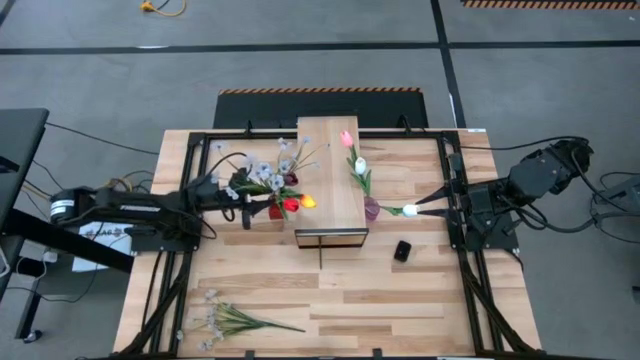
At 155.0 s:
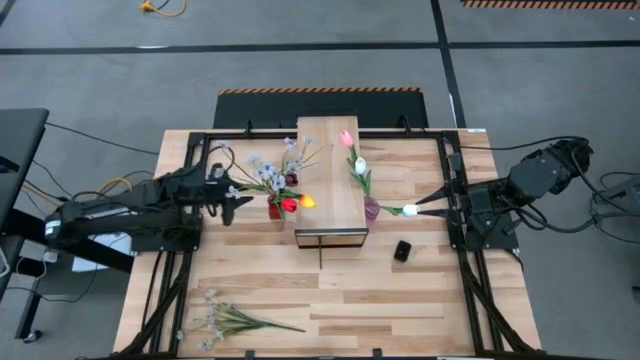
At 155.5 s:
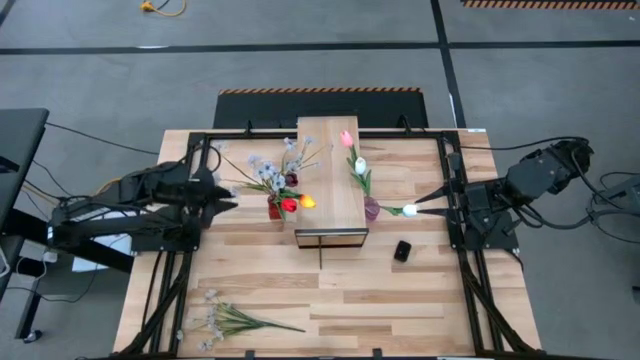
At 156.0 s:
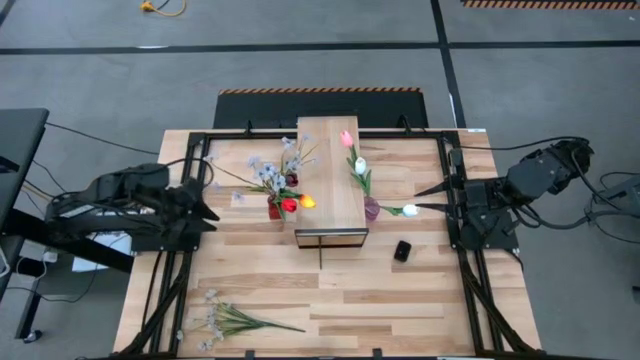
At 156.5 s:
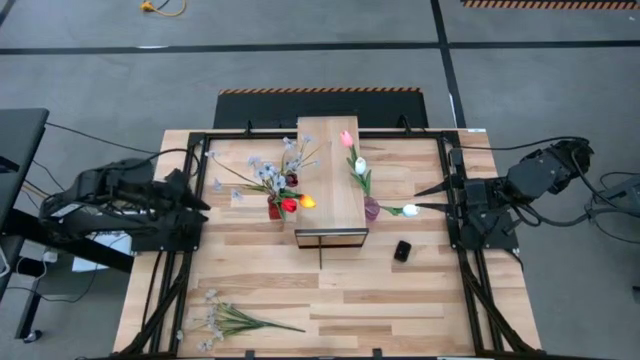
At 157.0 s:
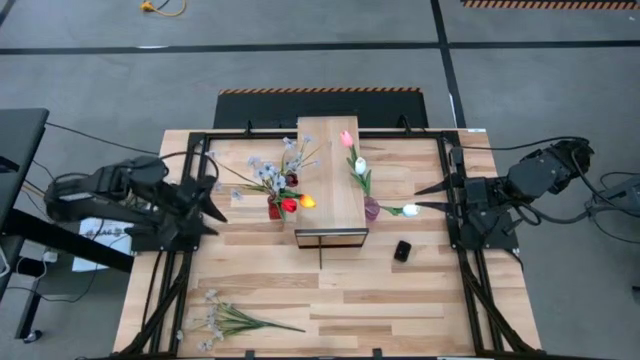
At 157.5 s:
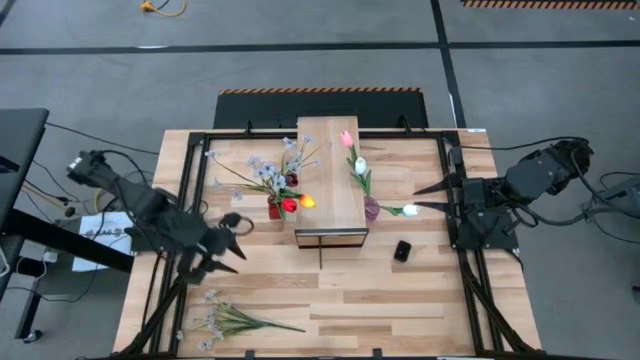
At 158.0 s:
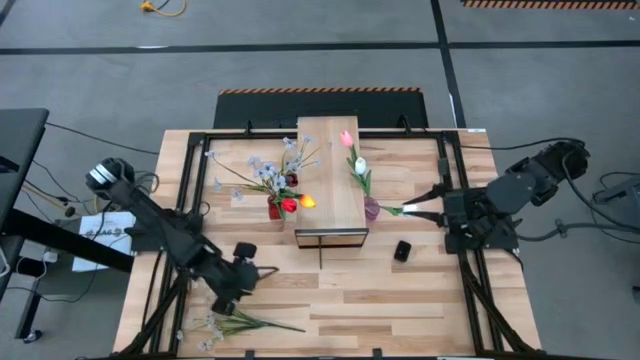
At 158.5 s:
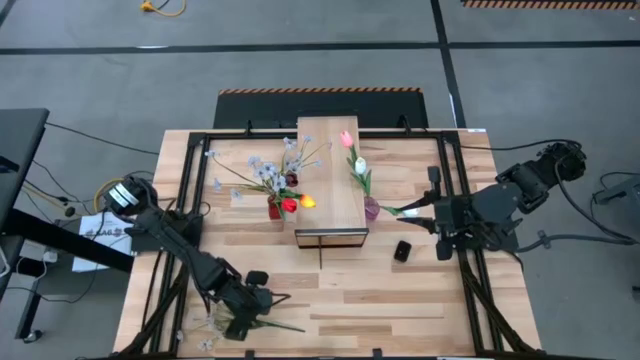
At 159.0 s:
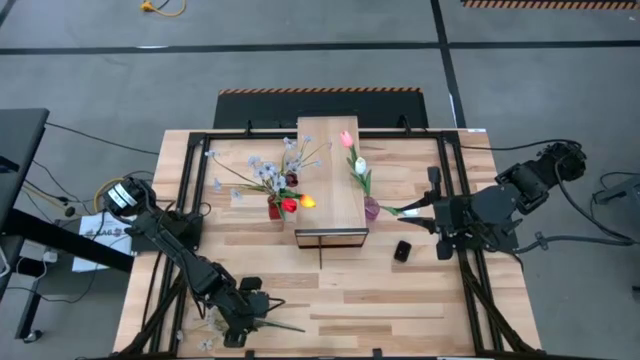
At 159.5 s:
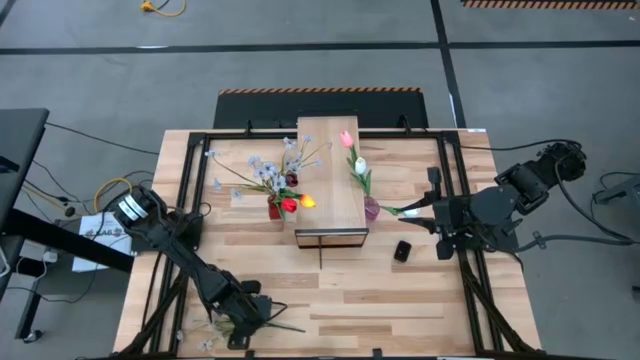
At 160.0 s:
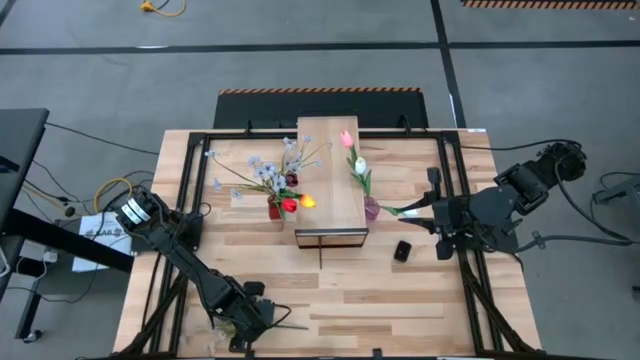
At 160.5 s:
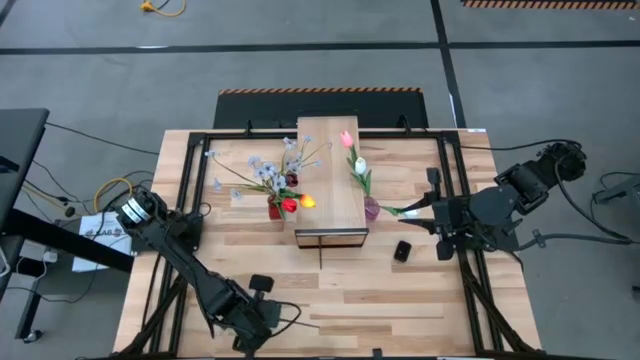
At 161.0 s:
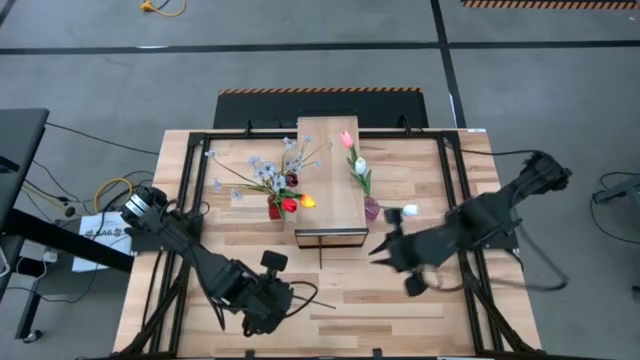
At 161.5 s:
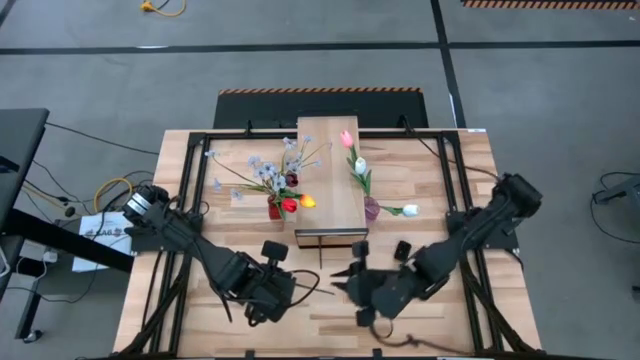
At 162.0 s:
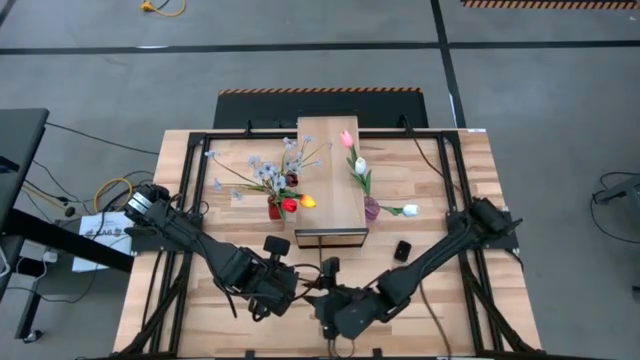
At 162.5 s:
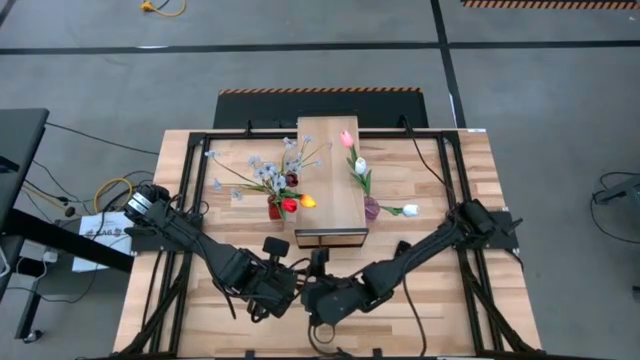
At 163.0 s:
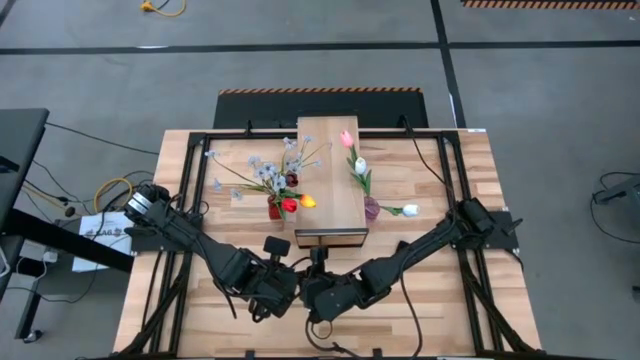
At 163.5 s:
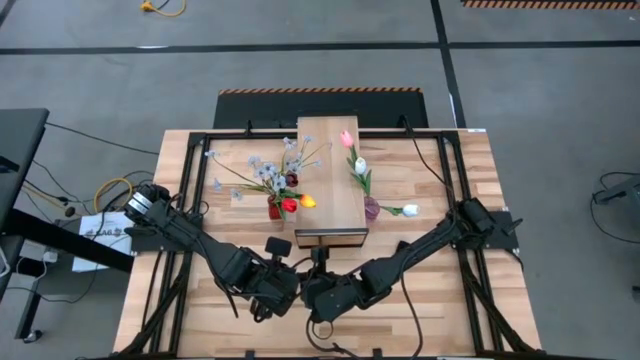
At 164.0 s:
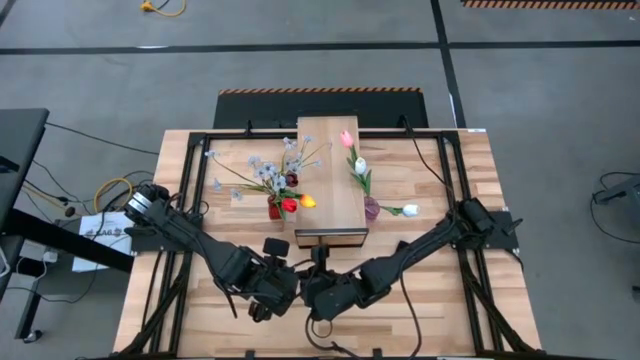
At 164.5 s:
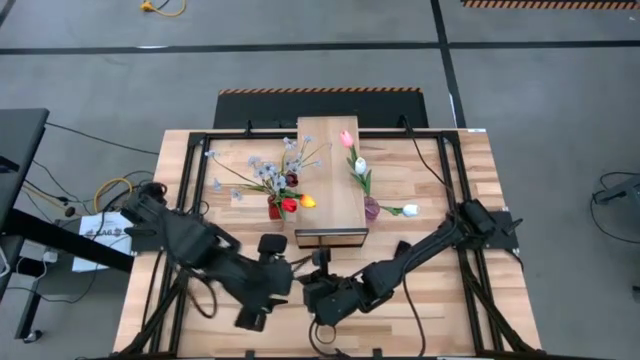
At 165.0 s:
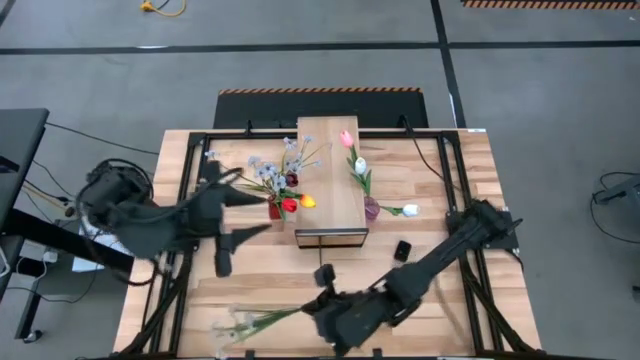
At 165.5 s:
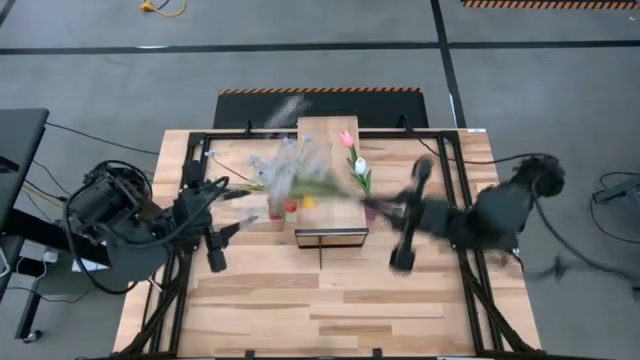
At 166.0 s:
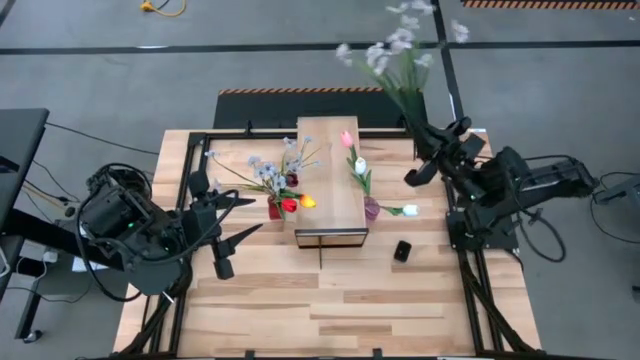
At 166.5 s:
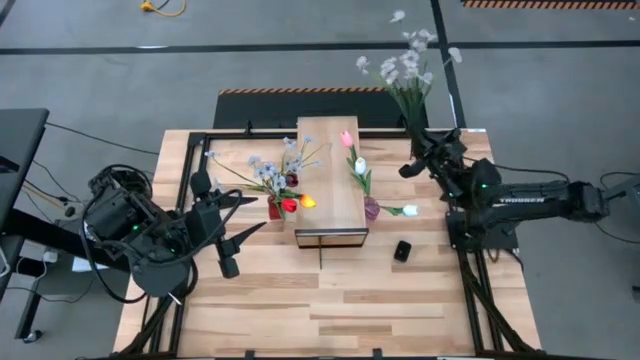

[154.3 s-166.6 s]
Task: Pick and place flowers into a vace then onto a shelf
Put the left white flowers into the purple flower vase

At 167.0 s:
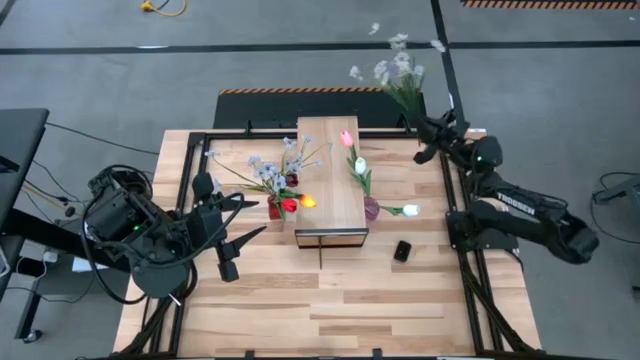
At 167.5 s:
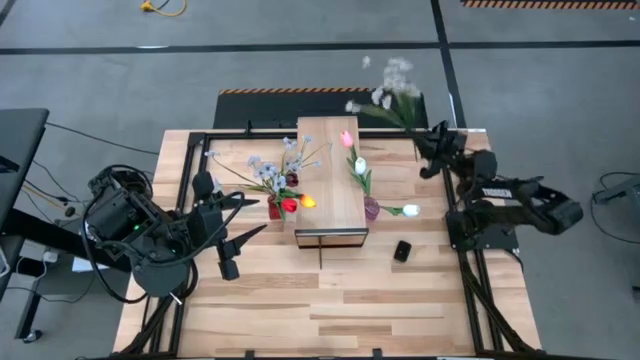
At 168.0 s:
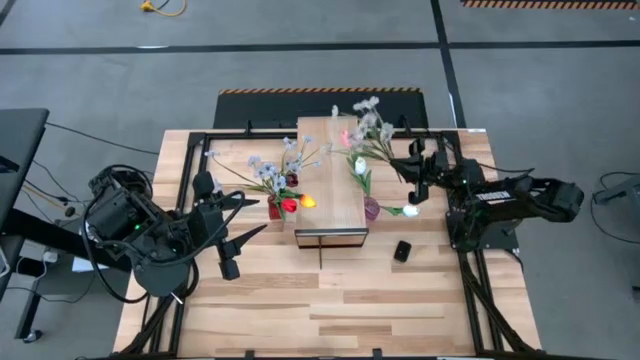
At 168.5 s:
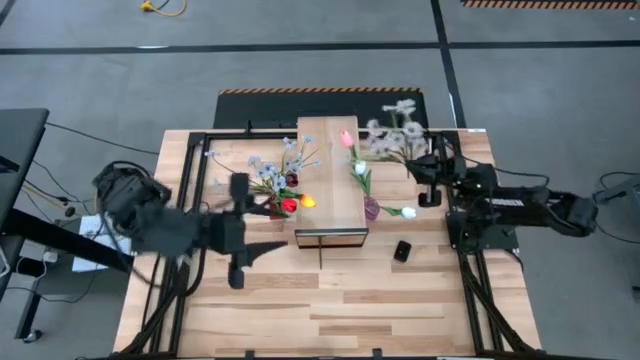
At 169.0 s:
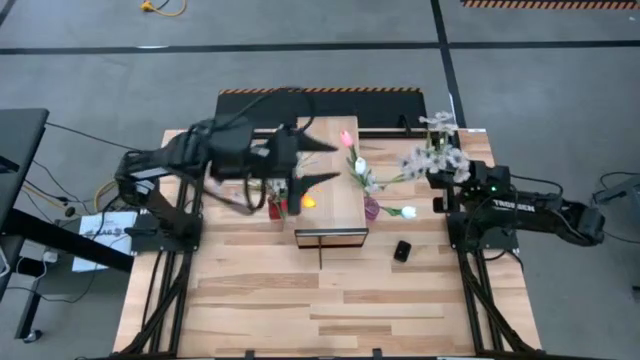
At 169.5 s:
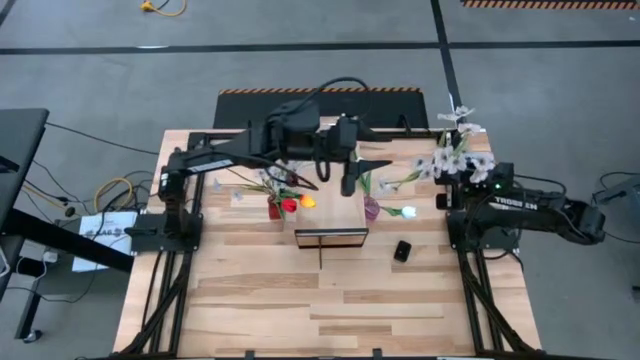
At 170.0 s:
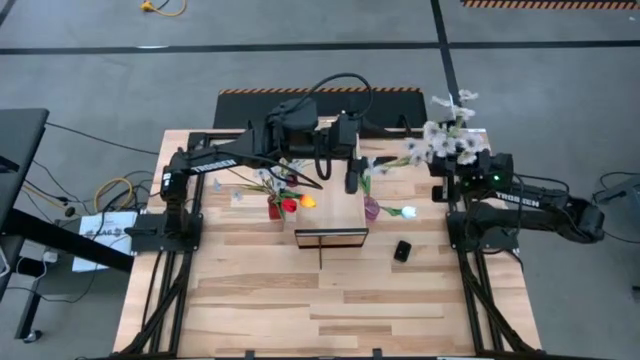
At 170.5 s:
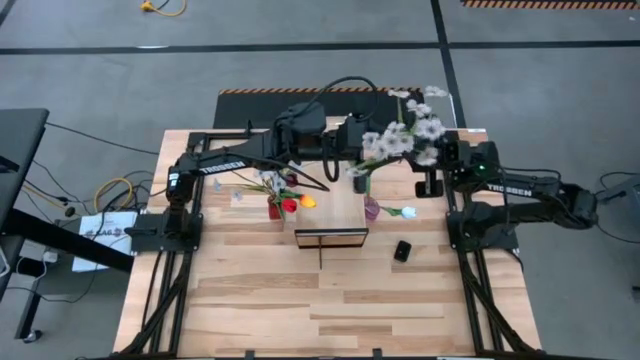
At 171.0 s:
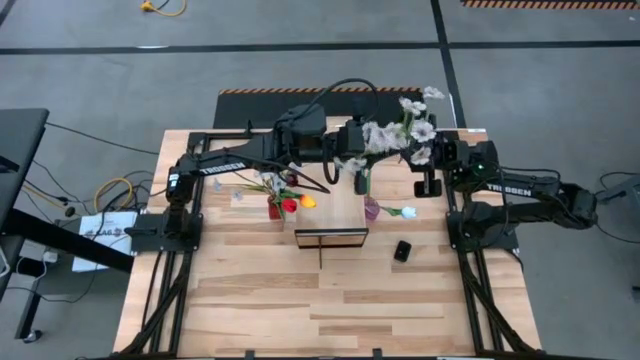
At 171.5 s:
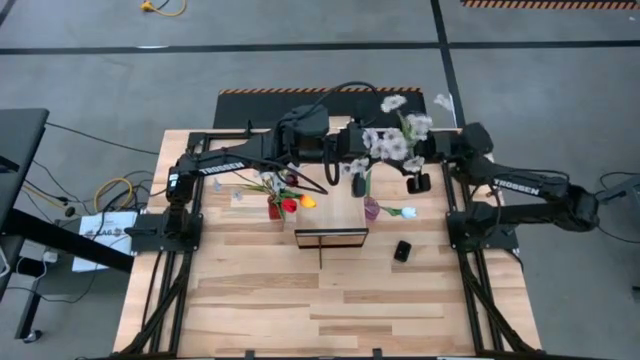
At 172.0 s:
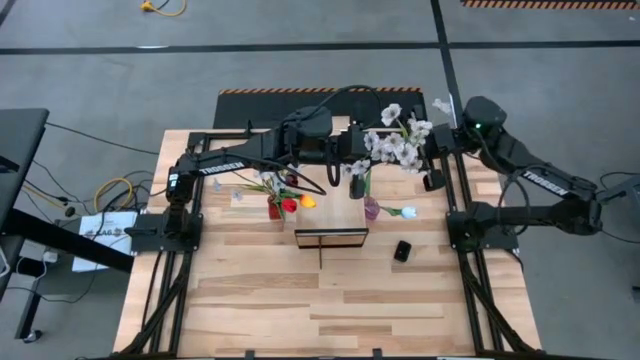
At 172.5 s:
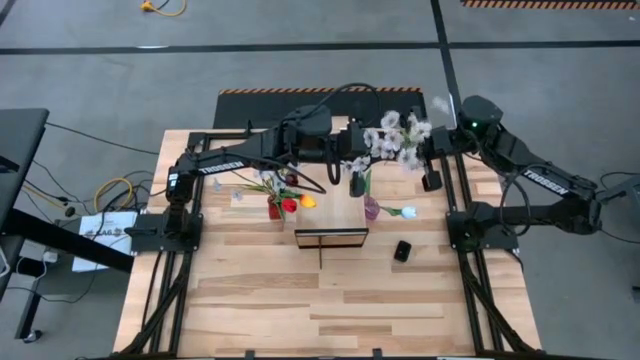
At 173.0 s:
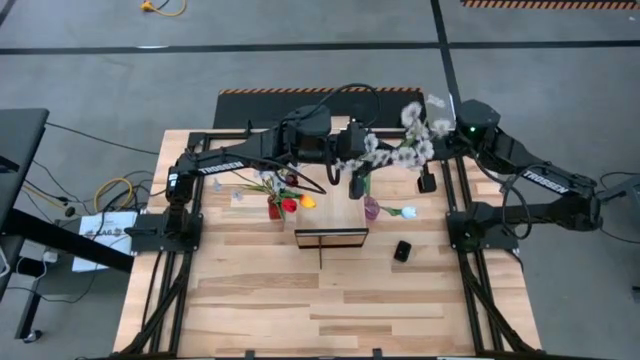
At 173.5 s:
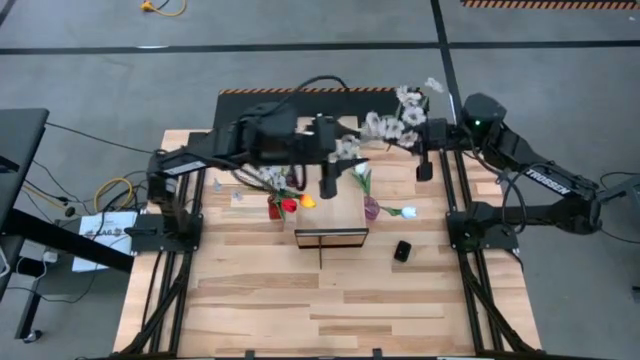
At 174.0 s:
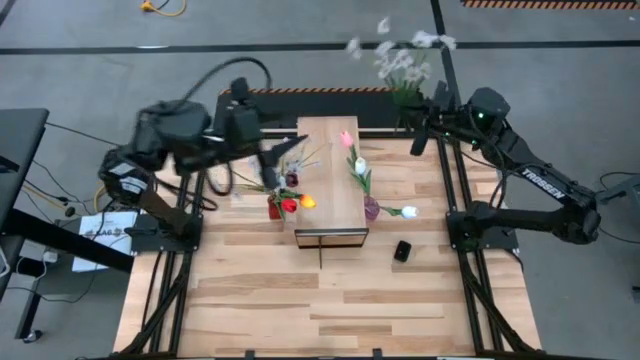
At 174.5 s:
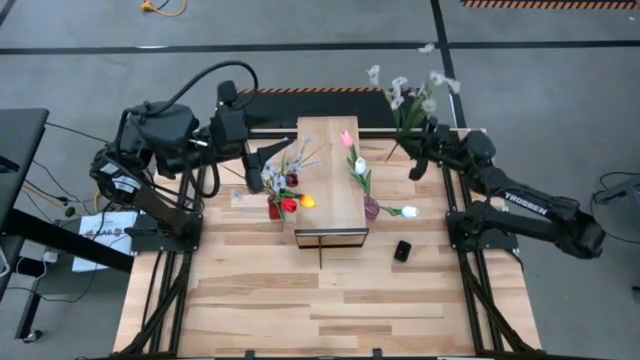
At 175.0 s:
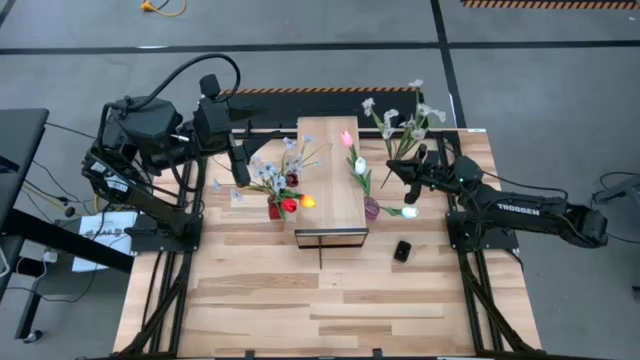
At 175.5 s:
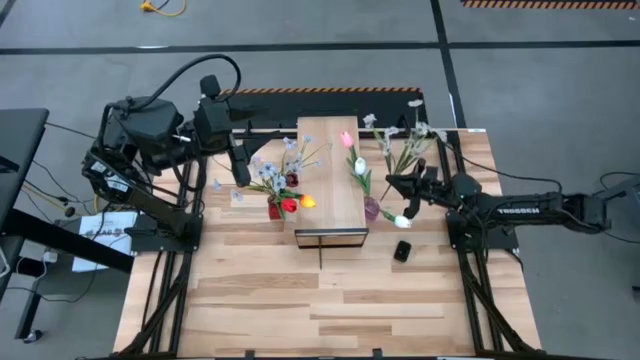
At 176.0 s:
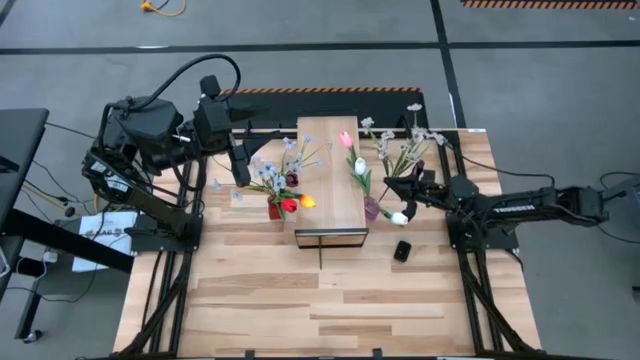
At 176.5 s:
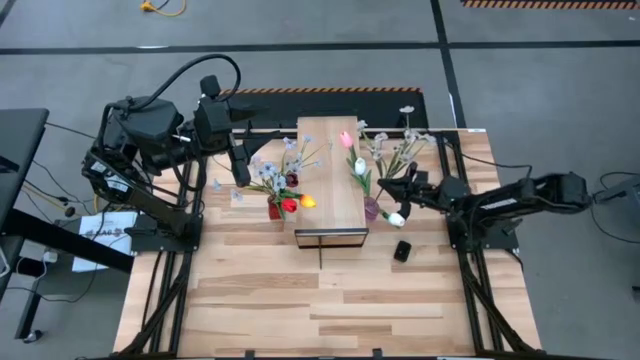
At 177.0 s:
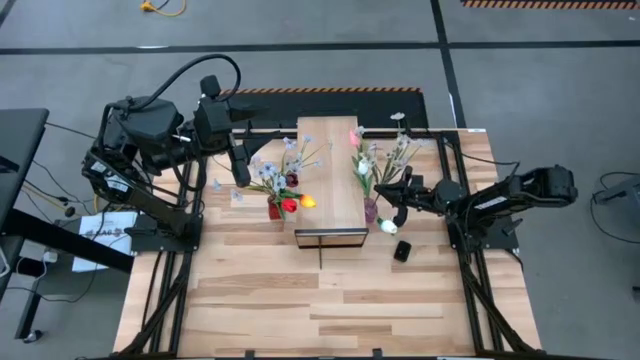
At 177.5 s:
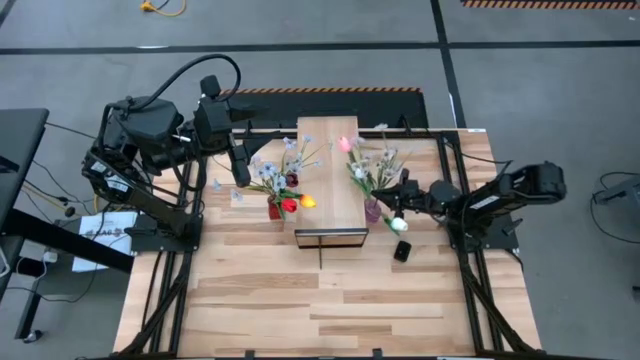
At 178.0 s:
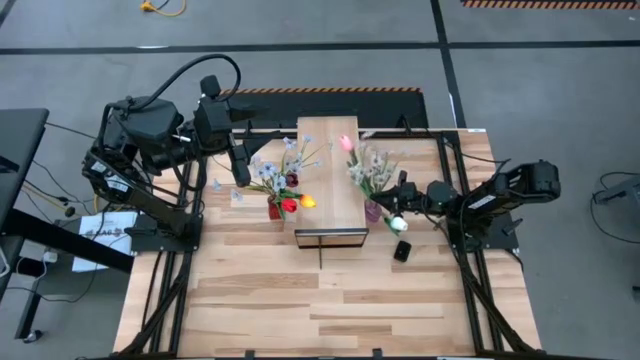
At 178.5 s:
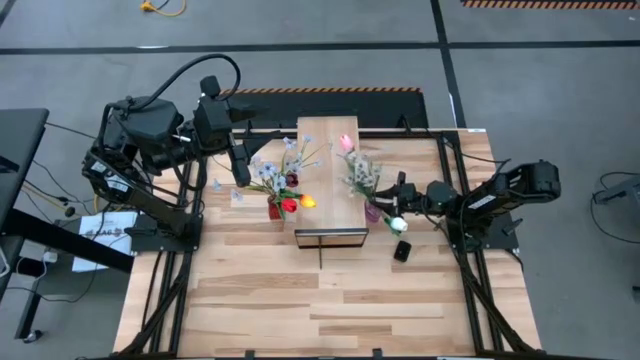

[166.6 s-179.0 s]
Put the left white flowers into the purple flower vase
